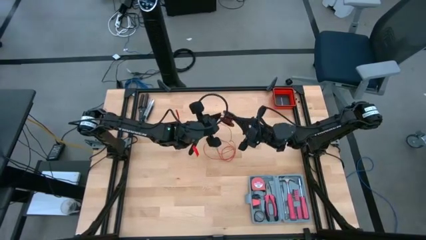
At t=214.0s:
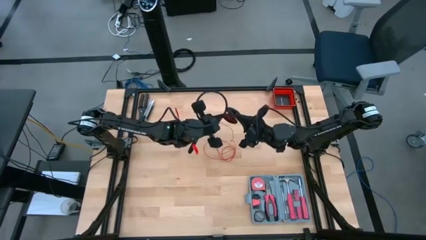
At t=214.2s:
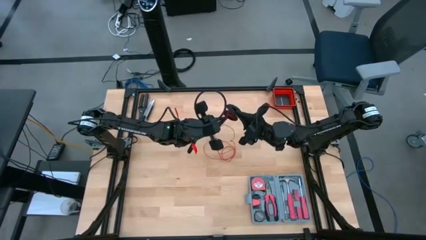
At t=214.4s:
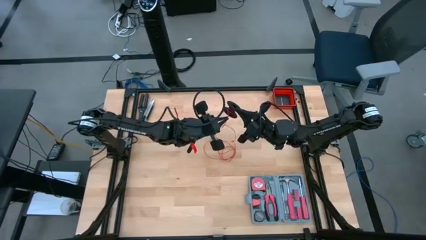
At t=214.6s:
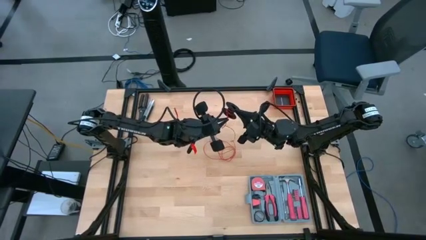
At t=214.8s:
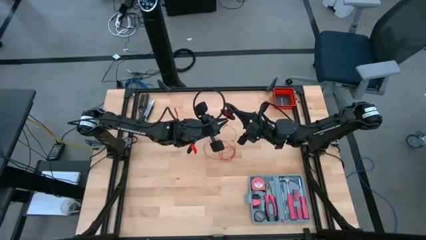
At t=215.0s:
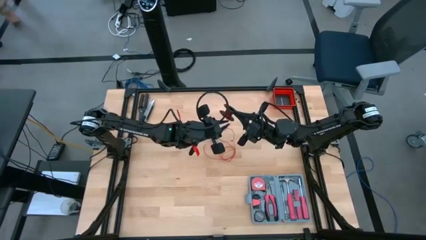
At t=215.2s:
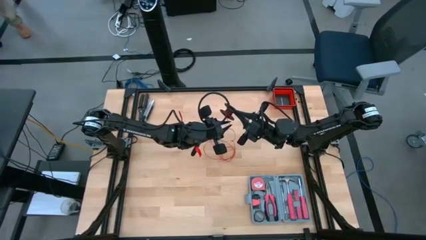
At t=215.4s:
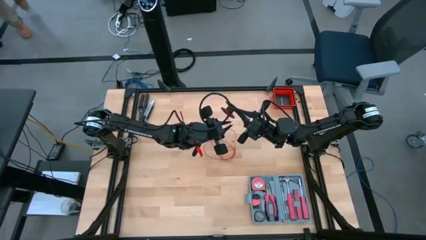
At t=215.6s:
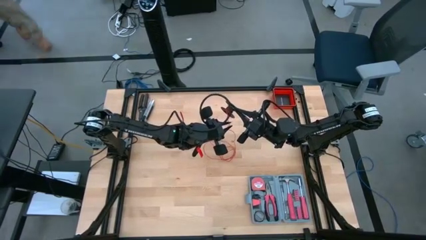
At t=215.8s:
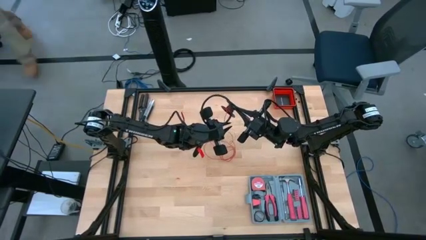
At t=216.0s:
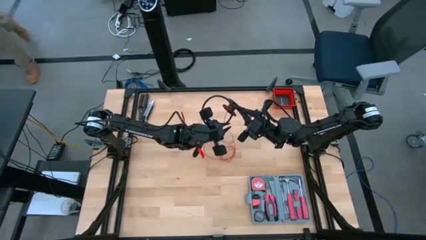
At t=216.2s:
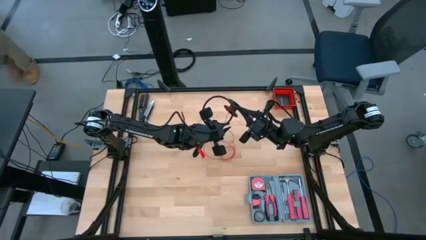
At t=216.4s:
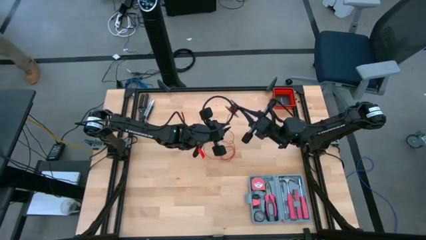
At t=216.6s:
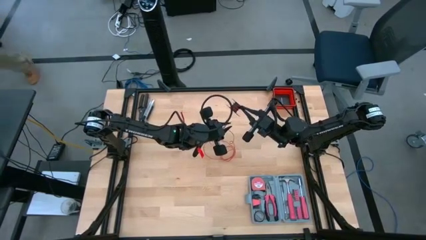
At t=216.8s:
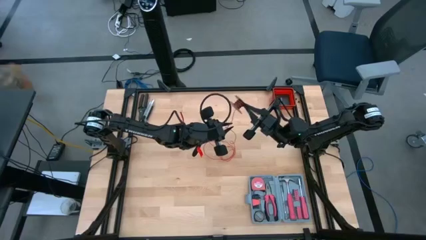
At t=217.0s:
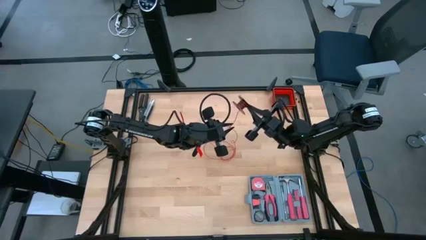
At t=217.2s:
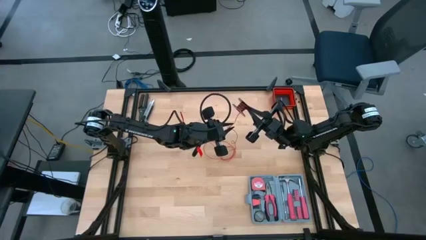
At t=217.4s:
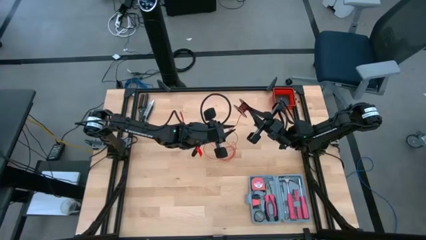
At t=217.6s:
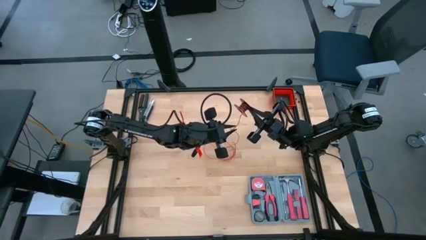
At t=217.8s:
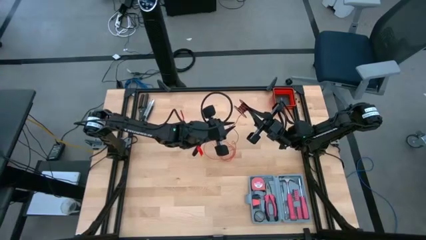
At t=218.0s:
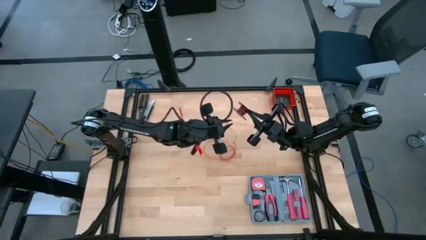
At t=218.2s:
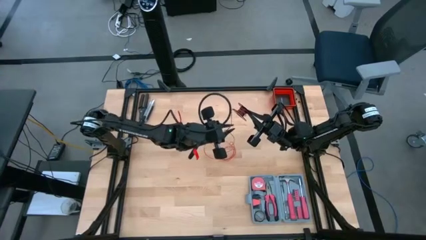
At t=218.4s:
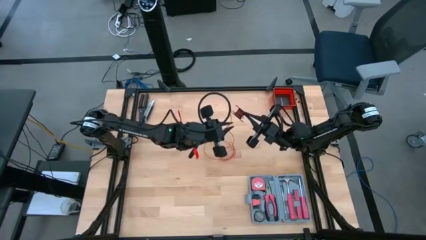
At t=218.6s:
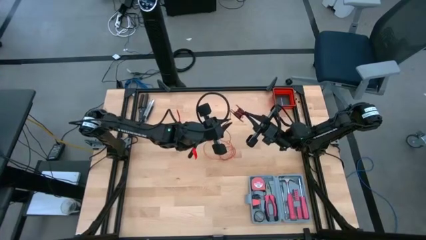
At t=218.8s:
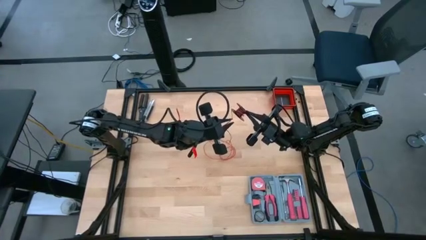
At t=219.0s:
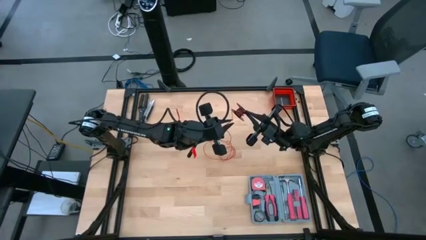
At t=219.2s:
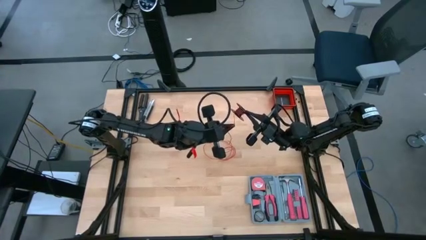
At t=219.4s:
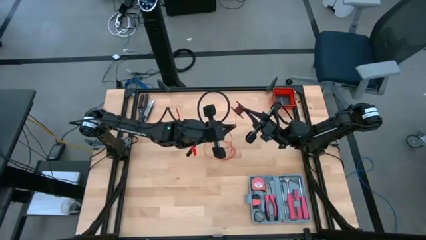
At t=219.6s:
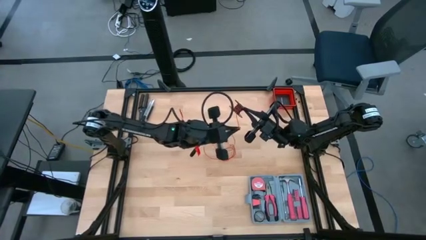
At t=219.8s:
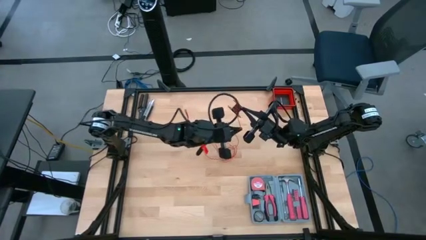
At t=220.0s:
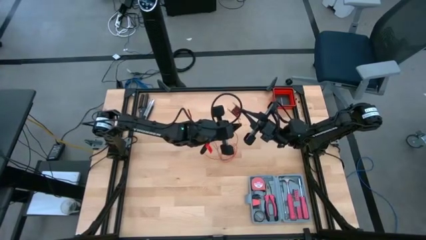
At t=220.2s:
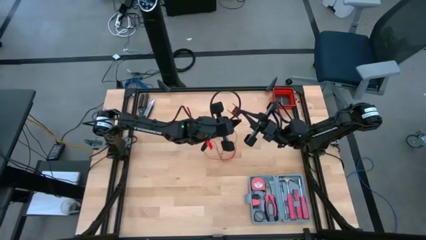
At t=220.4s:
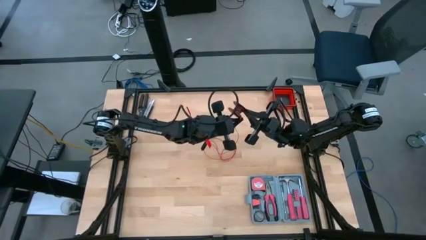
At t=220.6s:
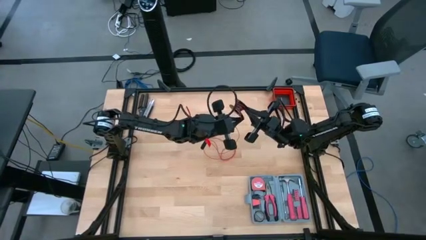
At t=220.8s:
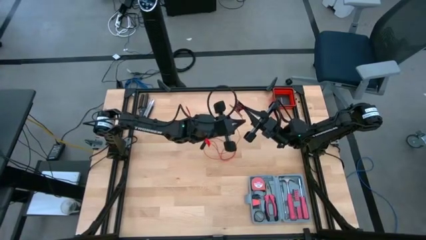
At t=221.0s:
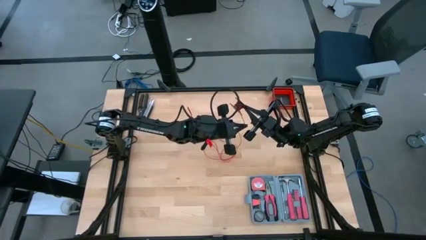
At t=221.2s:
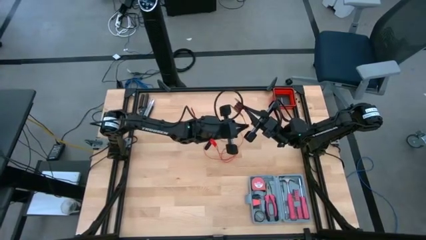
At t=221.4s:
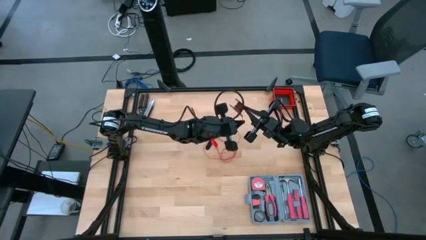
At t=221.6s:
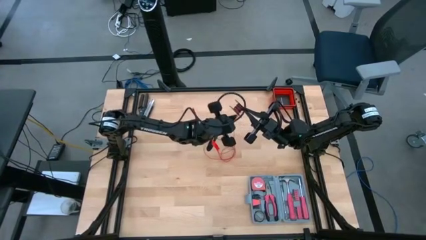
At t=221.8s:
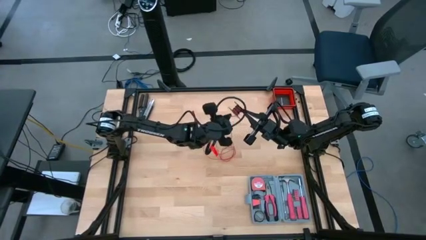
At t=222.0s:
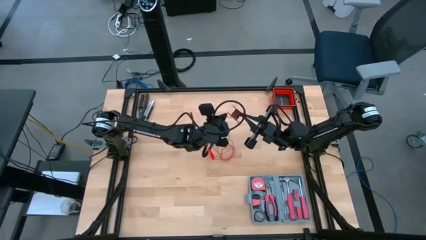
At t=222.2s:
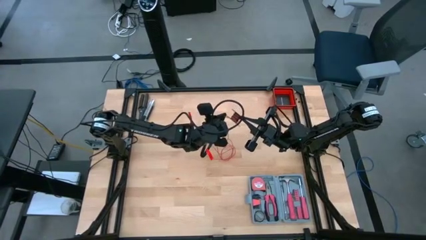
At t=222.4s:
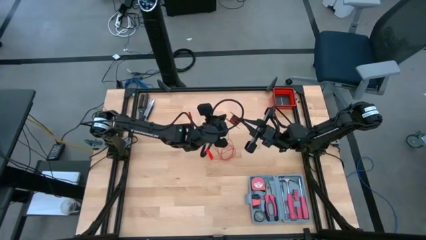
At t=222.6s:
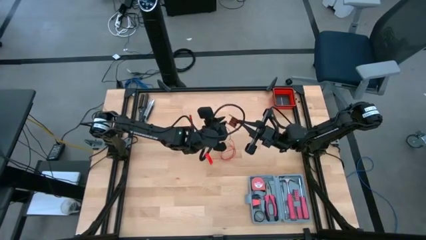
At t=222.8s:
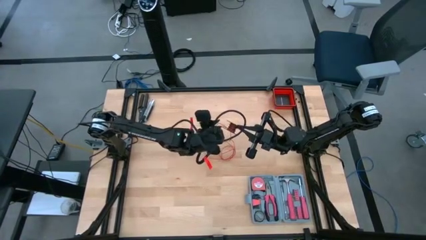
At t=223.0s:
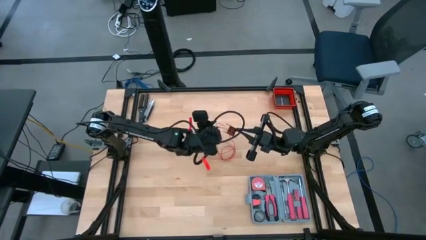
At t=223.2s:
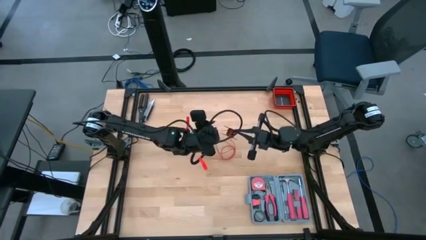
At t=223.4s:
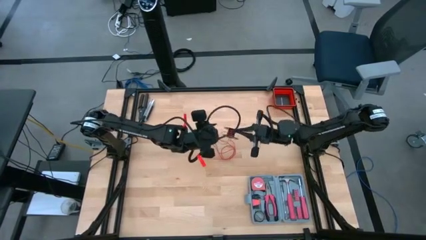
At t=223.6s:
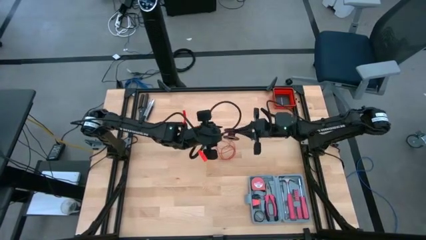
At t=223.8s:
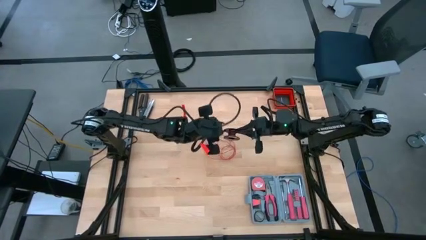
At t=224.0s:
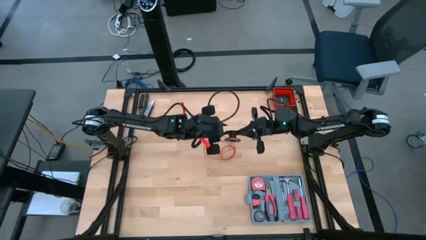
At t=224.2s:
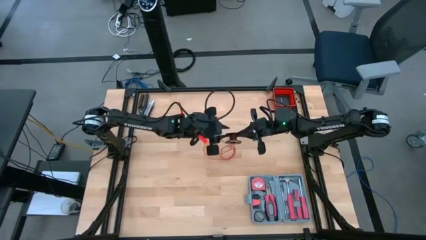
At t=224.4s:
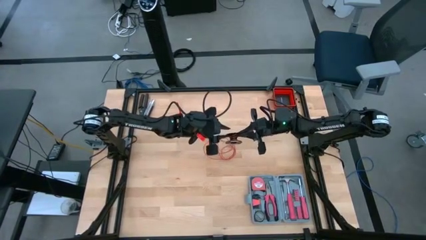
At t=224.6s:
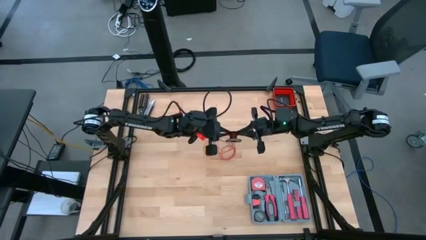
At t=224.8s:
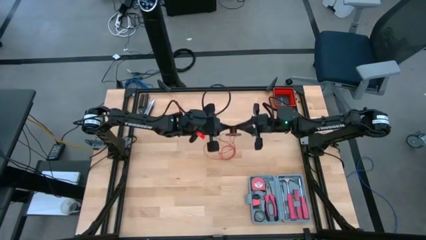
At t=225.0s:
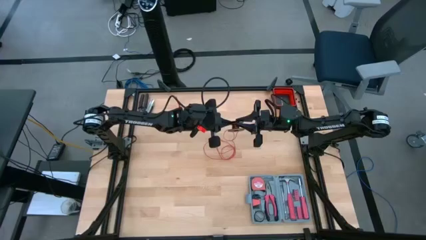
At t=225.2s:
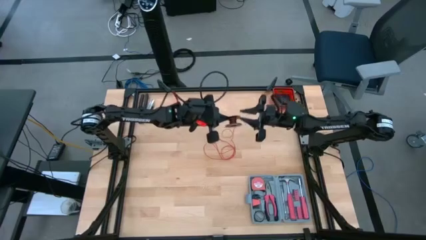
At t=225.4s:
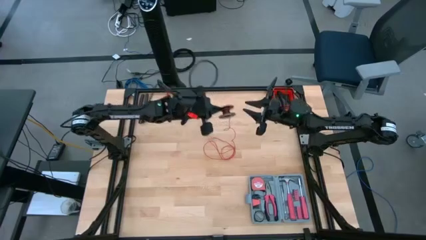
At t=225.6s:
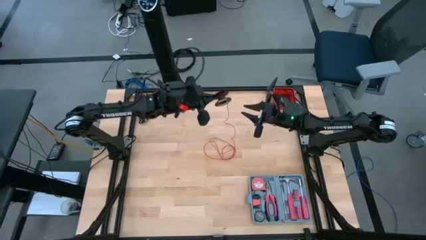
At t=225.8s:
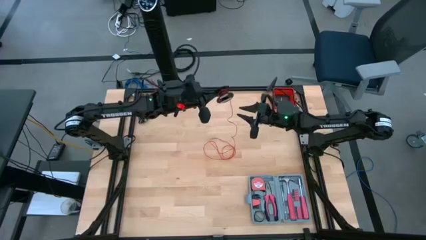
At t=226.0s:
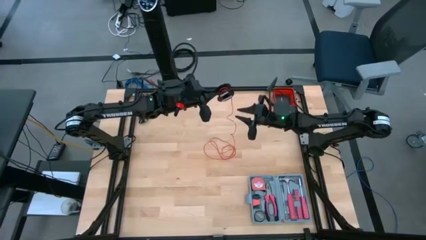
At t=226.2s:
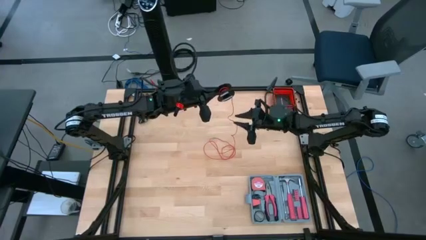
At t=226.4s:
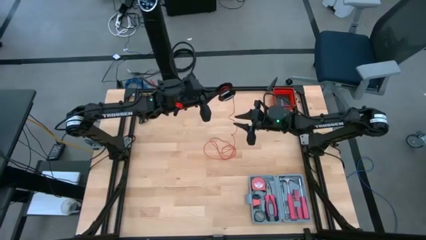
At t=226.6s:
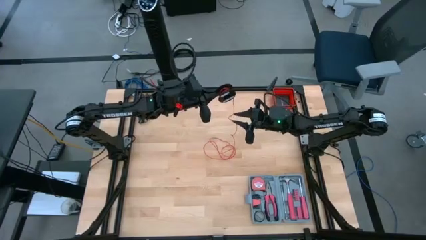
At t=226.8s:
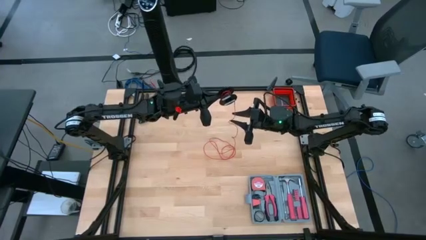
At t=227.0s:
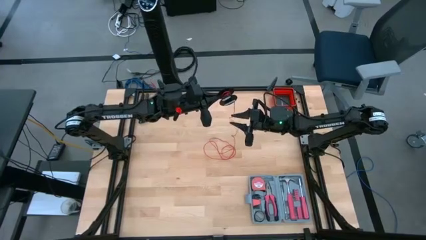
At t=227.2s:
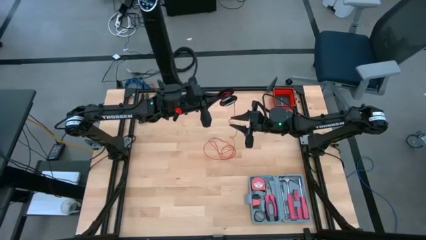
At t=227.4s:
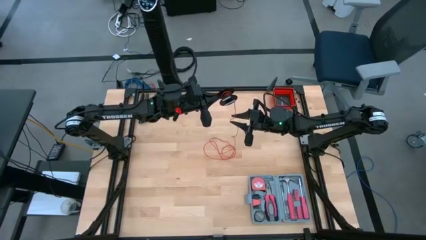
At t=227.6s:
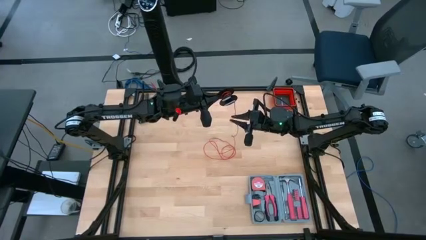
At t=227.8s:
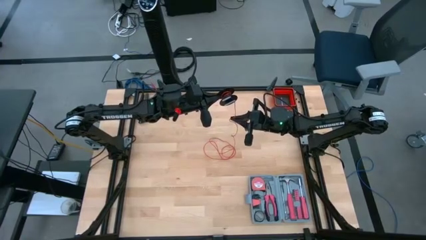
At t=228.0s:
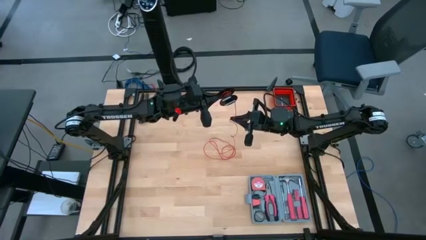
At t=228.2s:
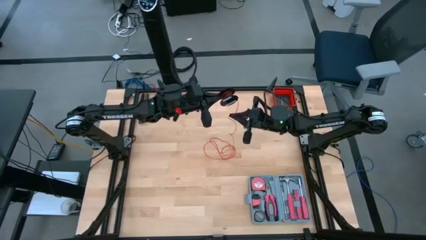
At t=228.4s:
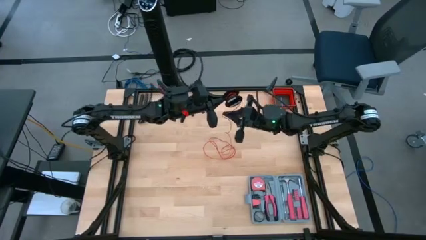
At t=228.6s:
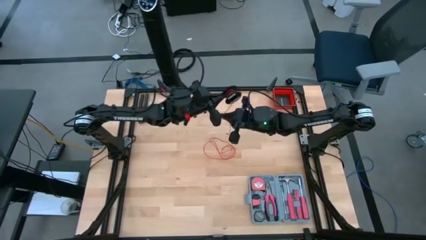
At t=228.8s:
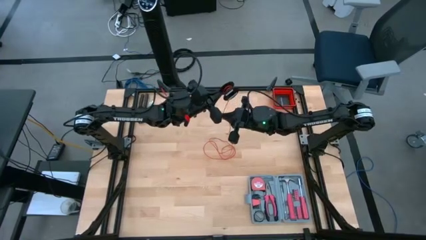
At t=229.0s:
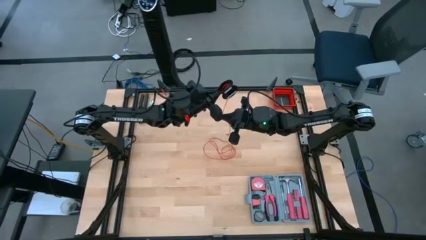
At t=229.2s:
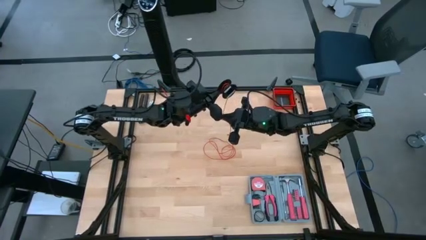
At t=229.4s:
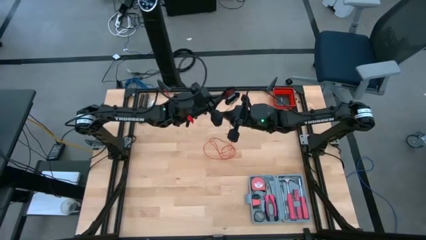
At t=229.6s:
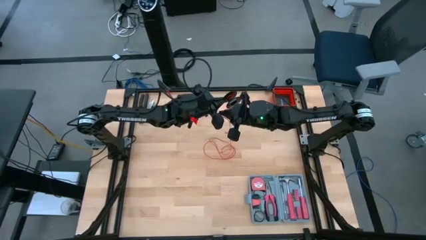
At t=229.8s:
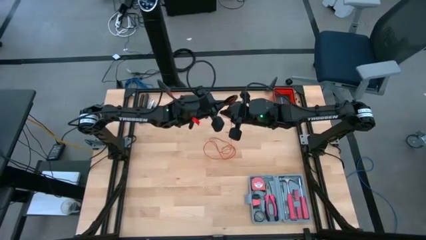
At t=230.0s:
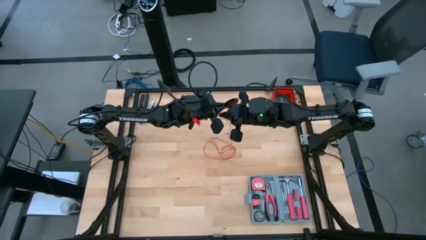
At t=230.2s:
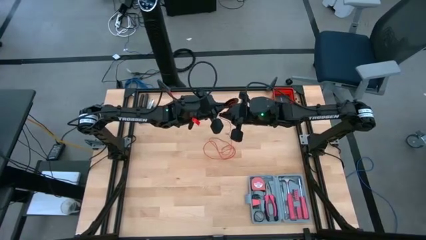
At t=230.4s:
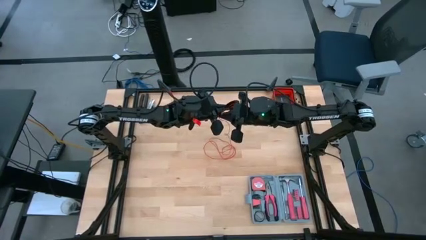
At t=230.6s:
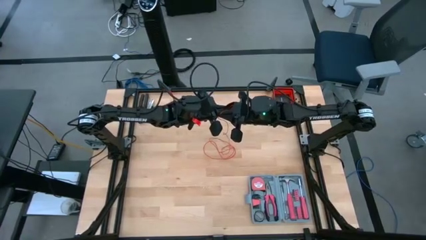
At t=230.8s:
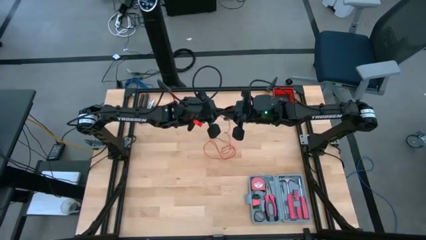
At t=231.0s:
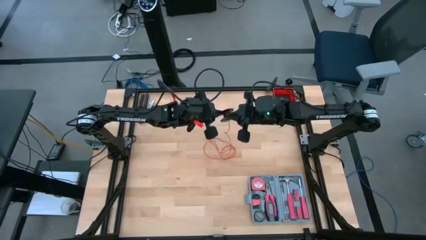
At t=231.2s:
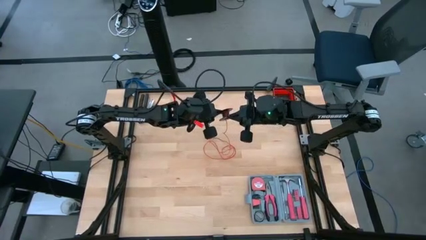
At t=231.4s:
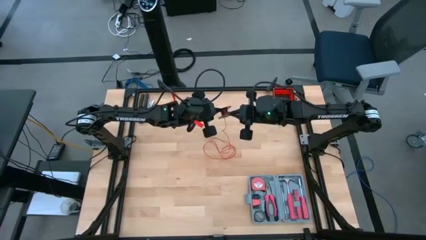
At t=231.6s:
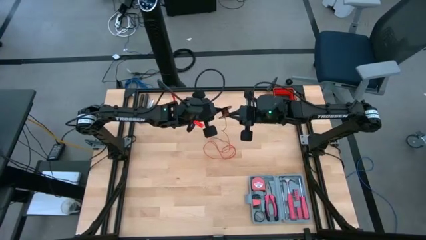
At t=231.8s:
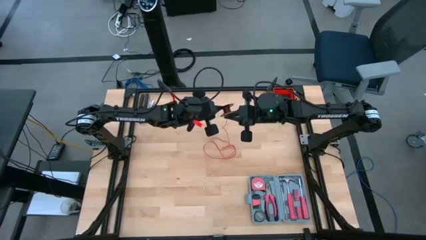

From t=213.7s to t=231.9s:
Task: Coil cords
Coil the wire
